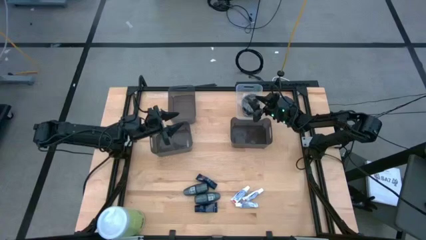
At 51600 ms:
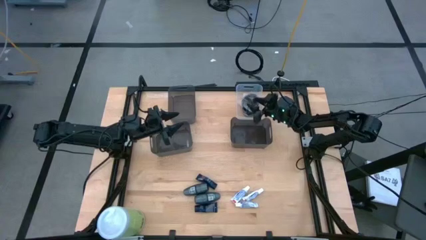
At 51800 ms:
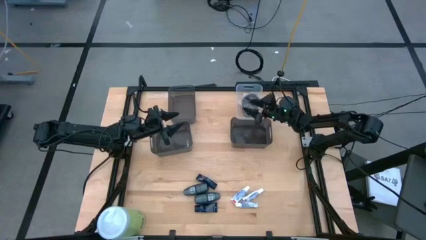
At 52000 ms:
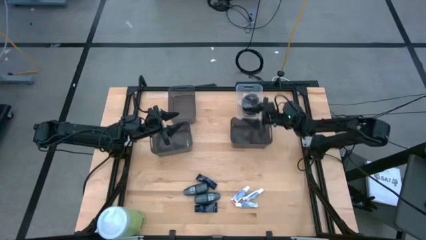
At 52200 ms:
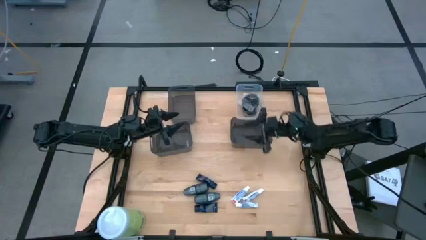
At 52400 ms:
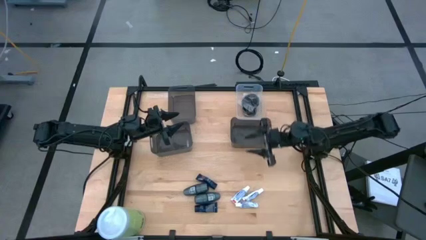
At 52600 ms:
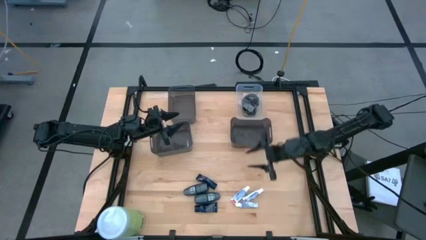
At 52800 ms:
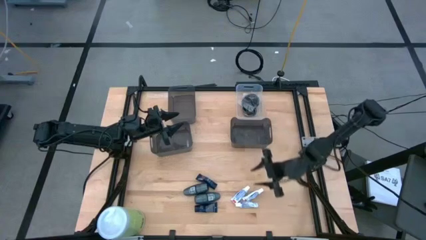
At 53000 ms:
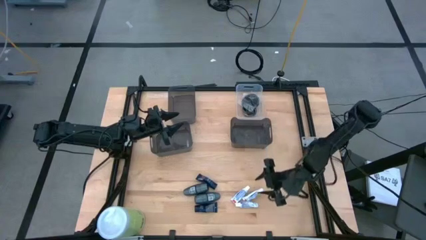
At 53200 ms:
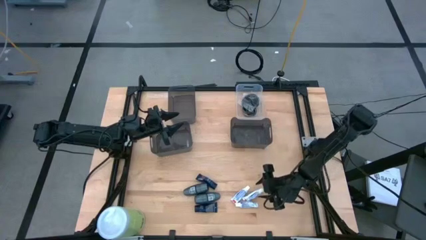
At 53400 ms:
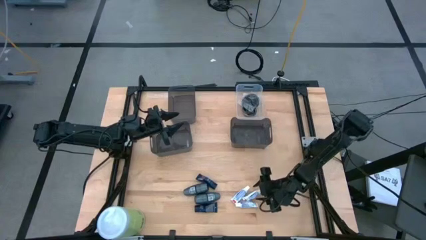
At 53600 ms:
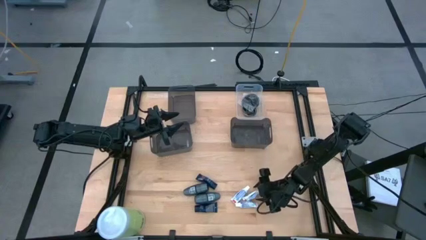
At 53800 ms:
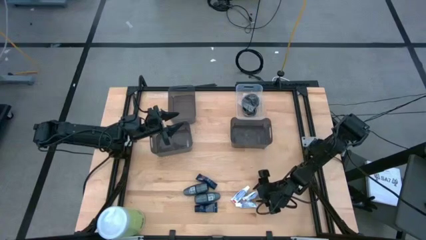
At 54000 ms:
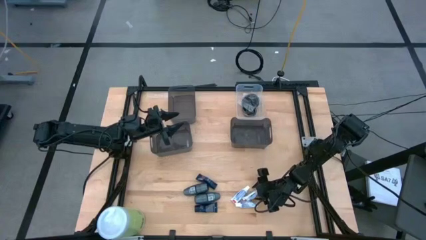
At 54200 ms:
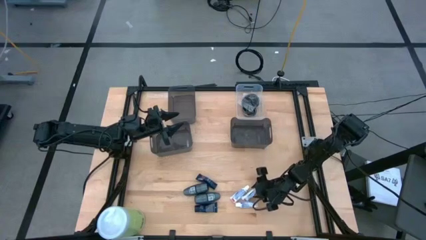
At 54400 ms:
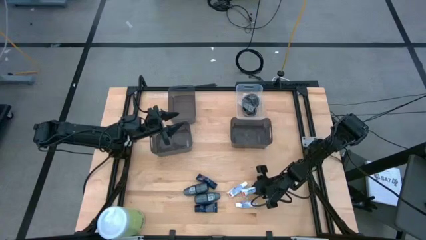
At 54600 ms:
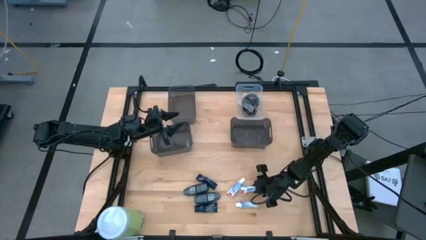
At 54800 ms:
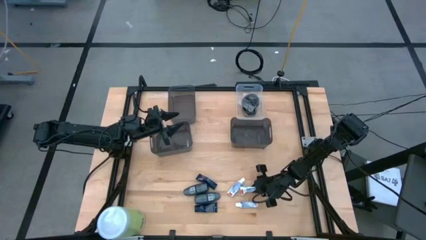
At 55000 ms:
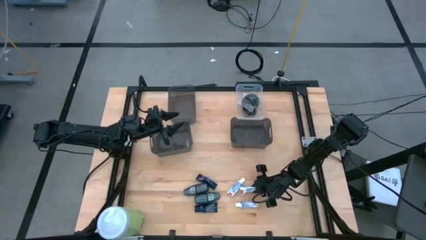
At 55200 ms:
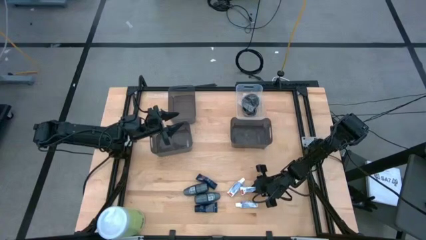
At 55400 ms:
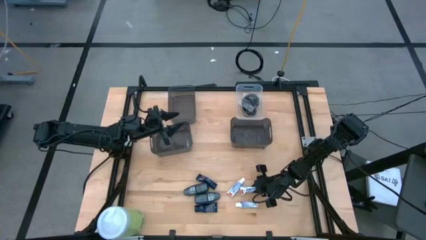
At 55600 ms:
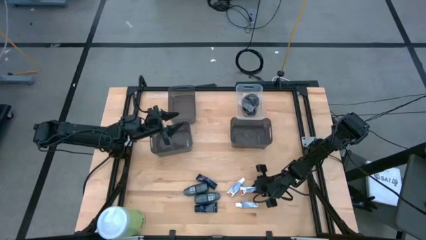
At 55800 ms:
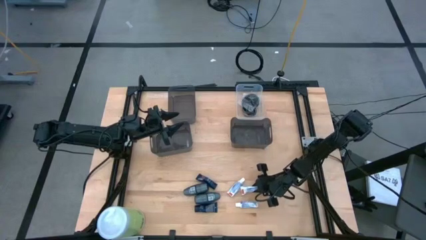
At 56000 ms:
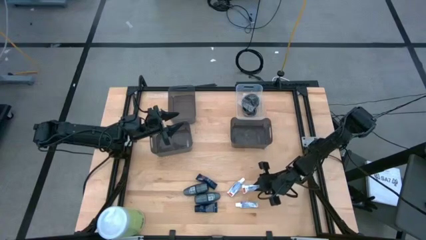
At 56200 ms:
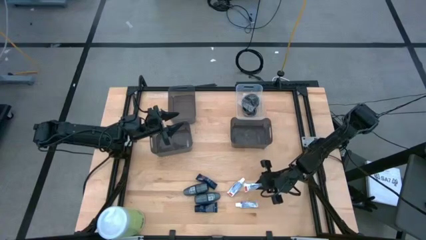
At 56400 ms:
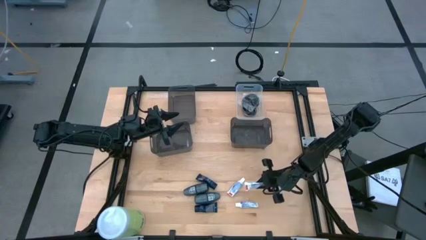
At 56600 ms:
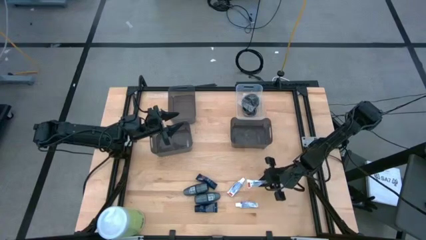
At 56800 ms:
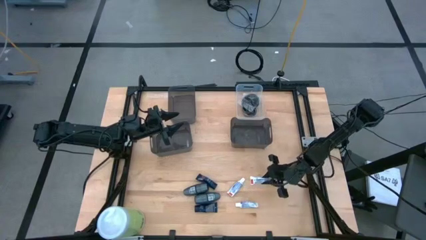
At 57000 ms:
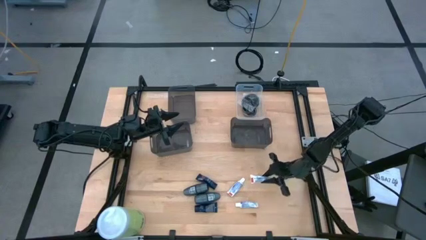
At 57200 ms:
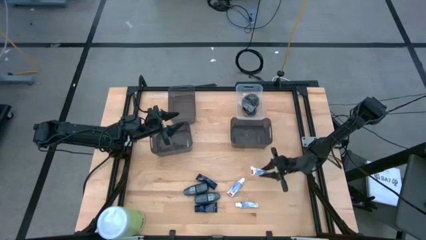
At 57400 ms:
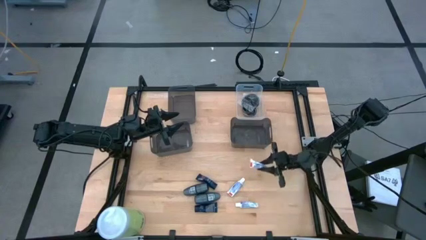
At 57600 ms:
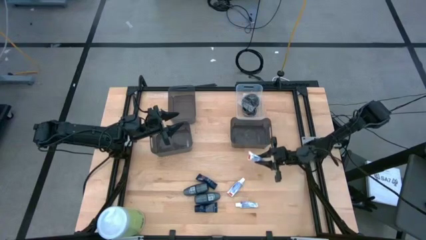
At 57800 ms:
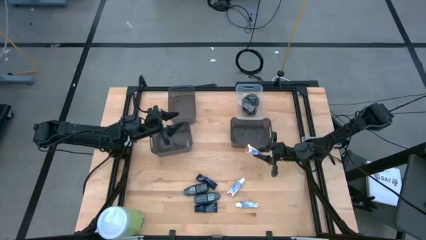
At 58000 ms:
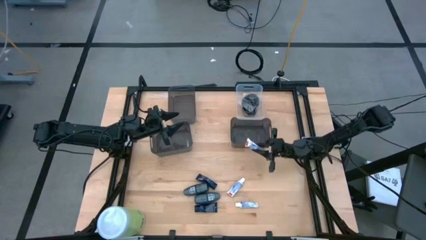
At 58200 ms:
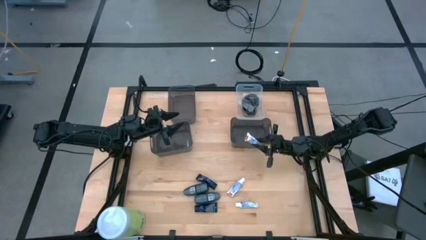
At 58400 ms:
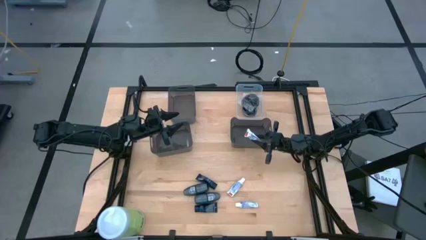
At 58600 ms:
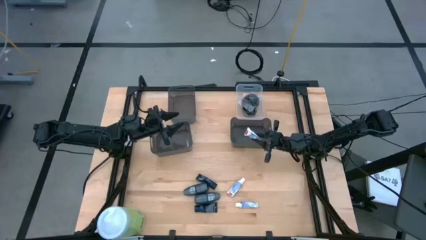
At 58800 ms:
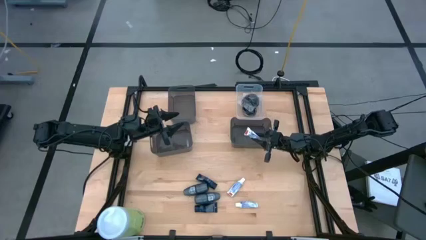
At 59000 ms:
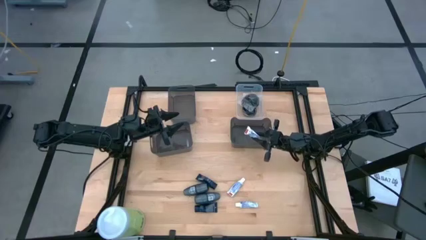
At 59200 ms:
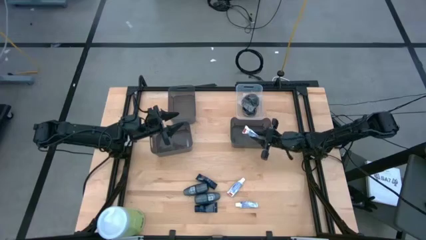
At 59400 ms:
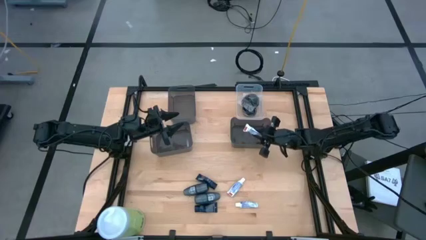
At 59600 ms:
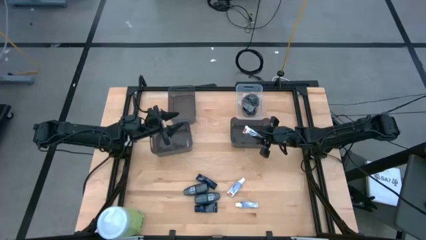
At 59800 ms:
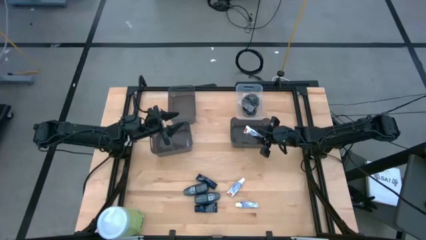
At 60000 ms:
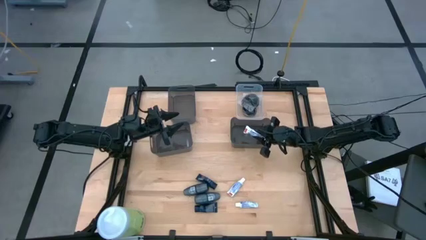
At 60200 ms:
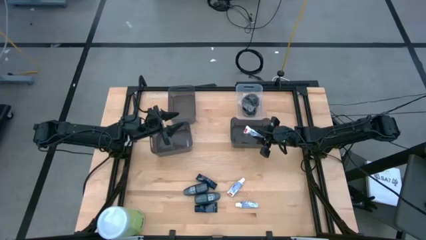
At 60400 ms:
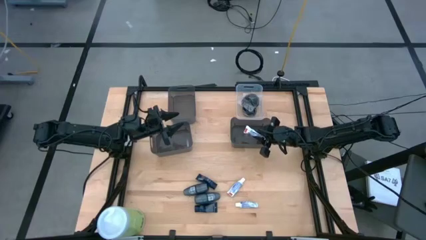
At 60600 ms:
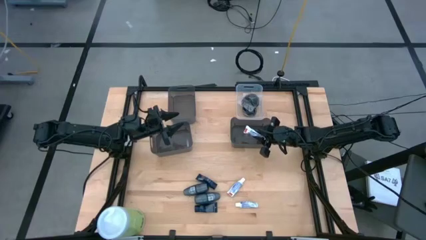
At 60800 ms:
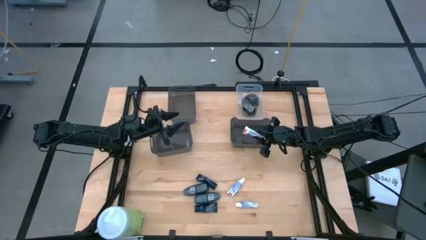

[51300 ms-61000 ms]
Task: Pick & Place Travel size toiletries
Put the top right white toothpaste into the bottom right black bin

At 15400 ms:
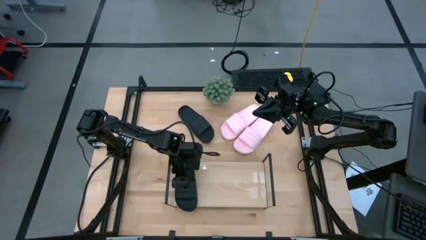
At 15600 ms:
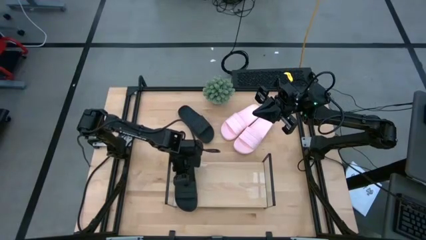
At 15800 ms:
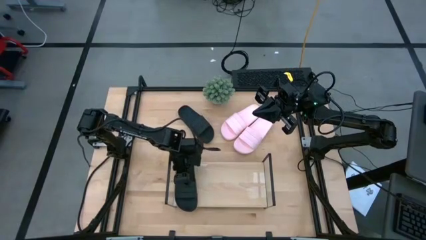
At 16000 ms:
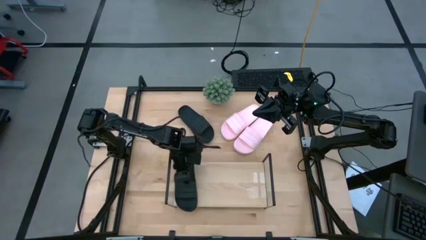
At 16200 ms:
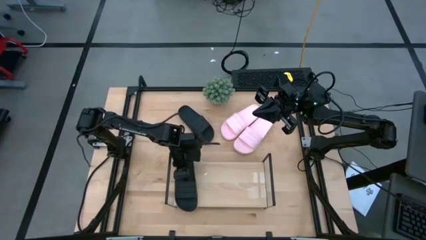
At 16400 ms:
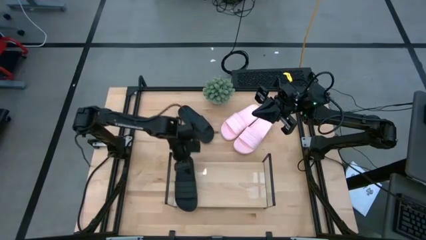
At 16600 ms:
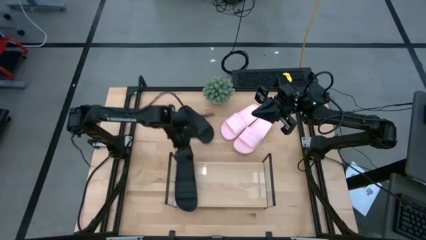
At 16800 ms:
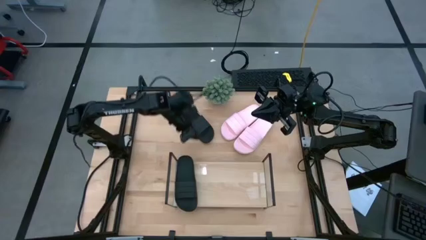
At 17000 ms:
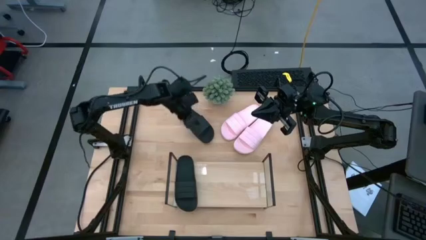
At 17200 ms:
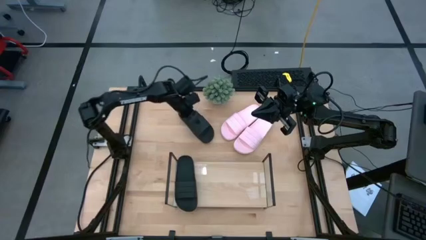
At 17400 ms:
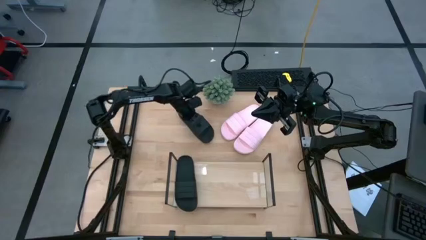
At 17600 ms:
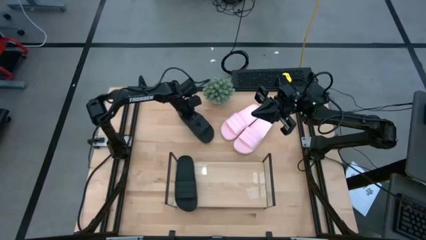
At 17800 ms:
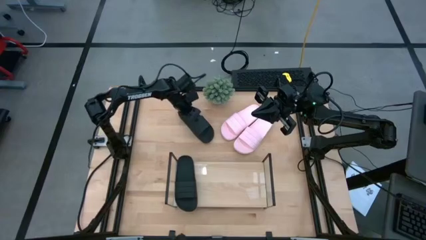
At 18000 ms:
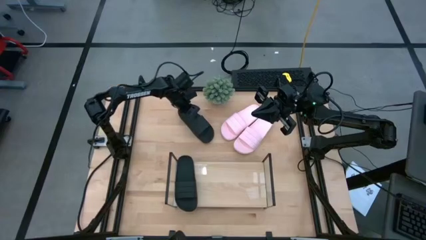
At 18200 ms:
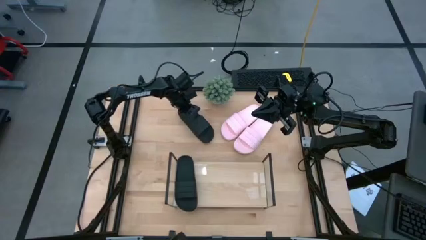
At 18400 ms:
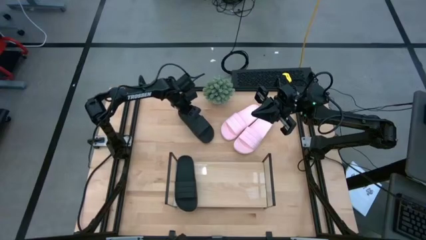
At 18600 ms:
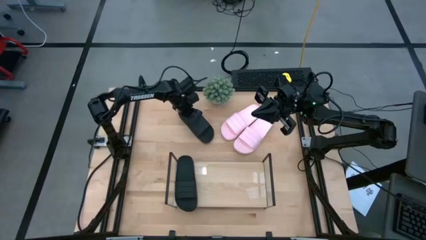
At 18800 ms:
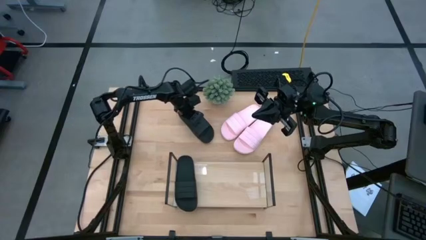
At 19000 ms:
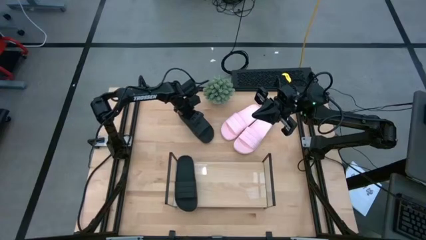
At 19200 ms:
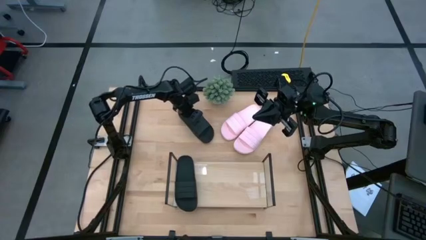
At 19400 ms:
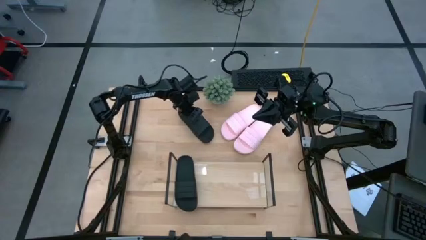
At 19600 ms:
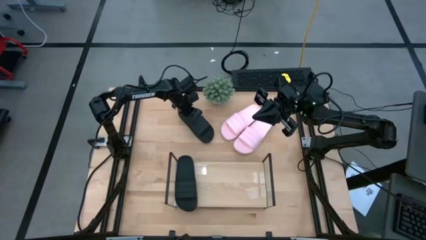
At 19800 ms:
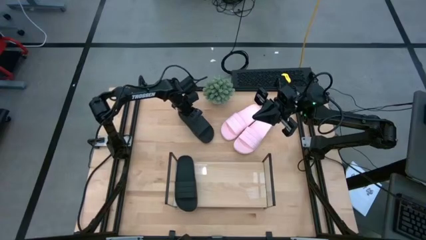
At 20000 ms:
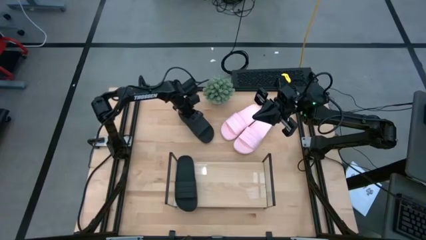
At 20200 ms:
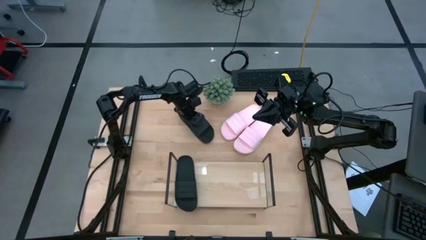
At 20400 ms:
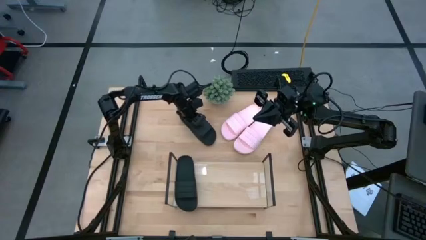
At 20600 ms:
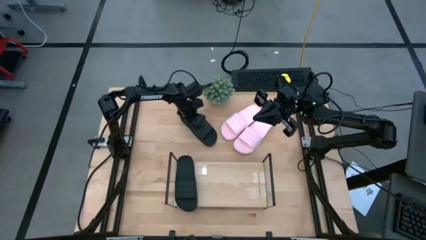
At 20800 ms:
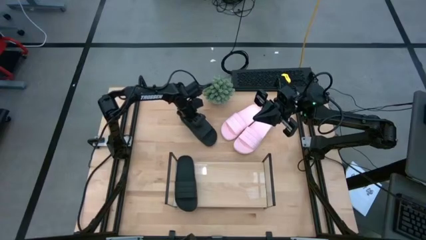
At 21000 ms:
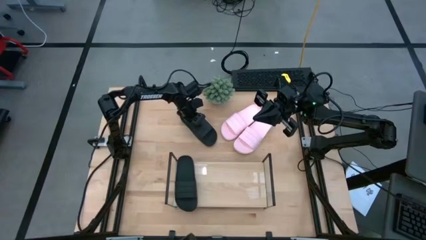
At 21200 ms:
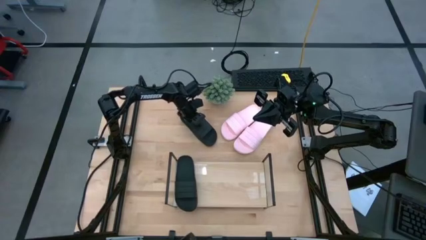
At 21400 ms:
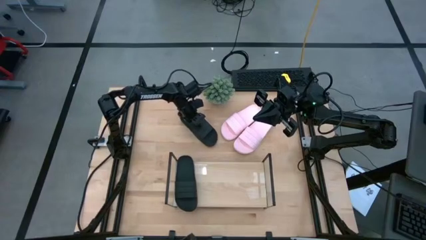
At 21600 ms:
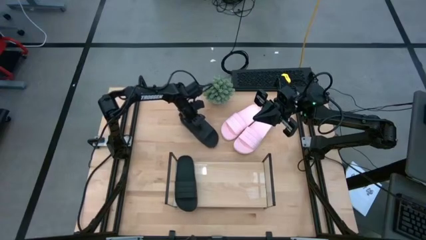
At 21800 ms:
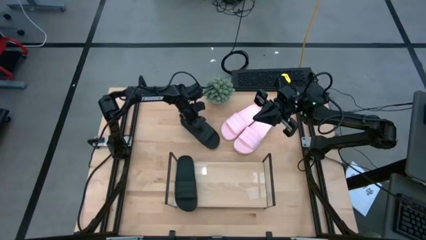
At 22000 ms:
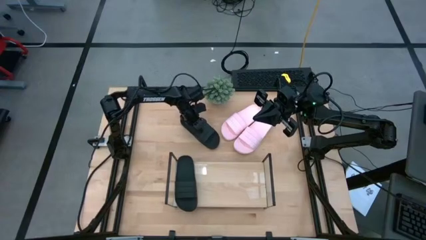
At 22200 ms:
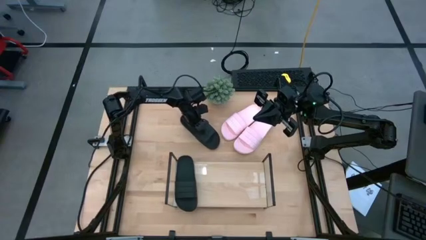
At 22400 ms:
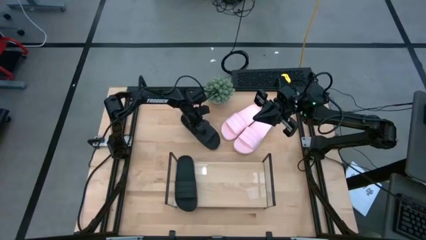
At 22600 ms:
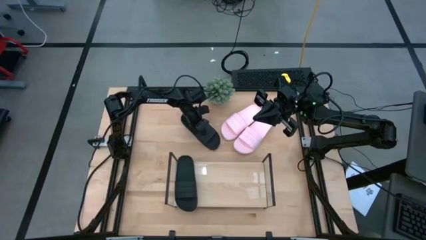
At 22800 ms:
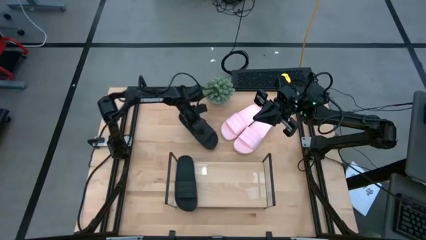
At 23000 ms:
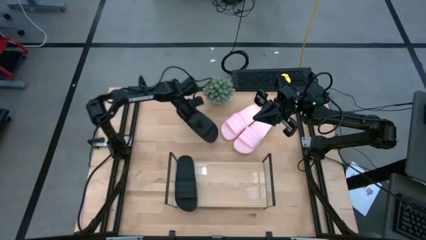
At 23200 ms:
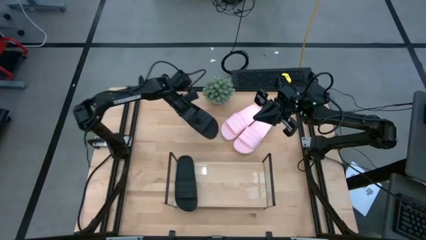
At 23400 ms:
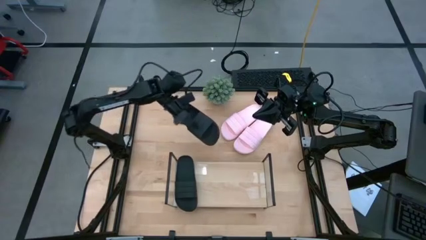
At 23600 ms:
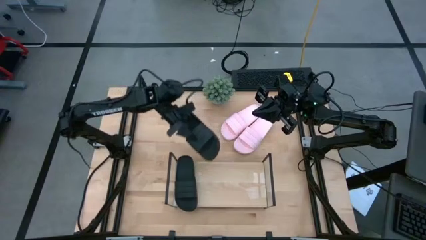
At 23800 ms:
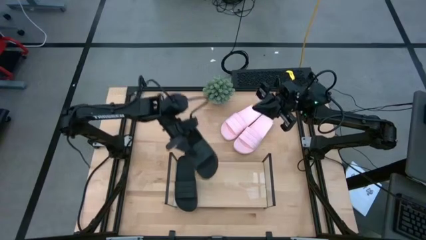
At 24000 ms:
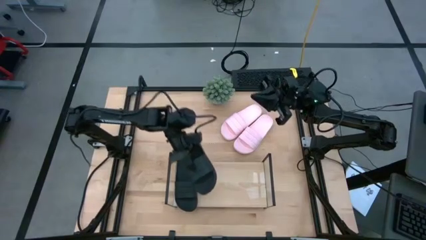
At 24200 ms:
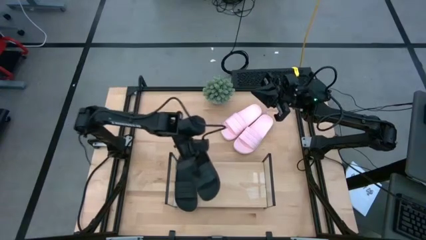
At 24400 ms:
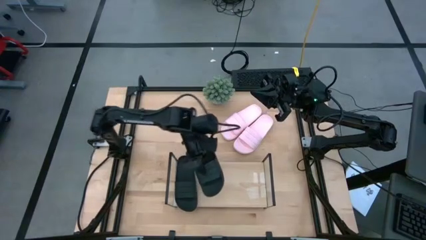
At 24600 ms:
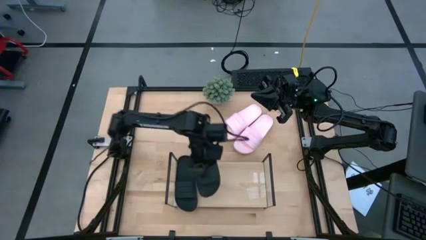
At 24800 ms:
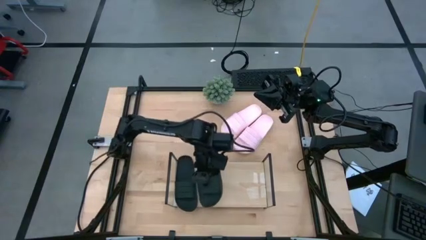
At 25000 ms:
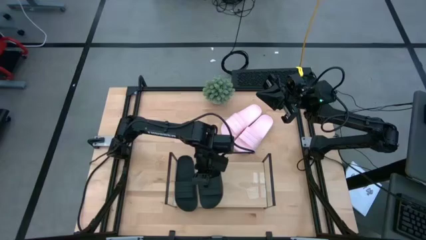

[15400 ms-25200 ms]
Task: Pick and place slides into the shelf
Put the right black slipper on the shelf
